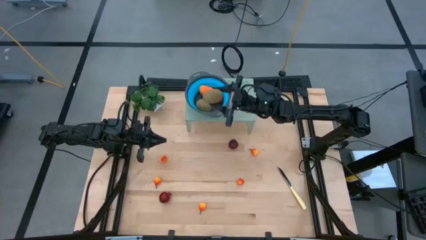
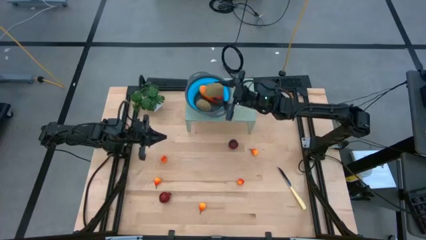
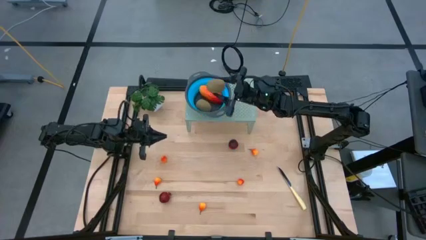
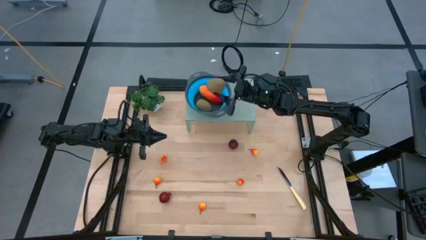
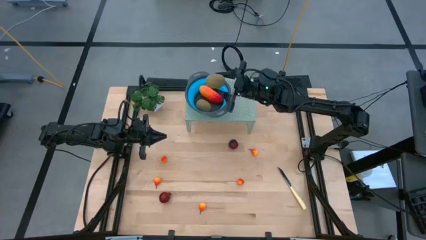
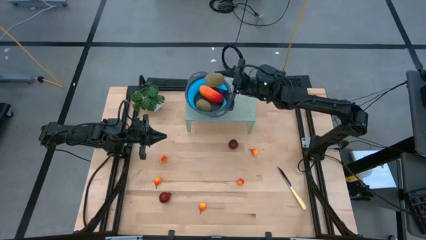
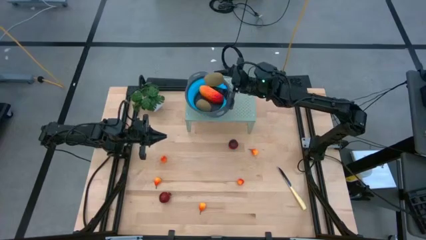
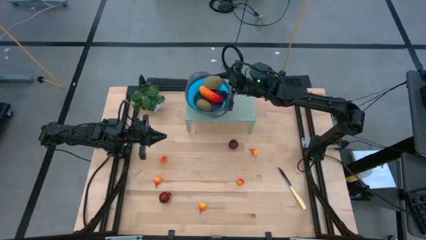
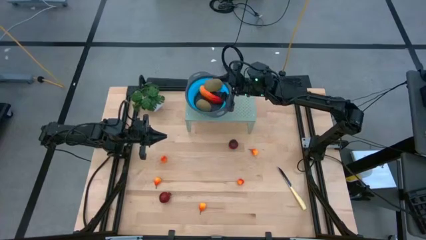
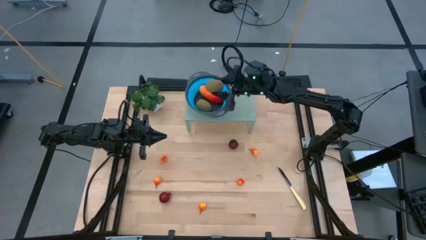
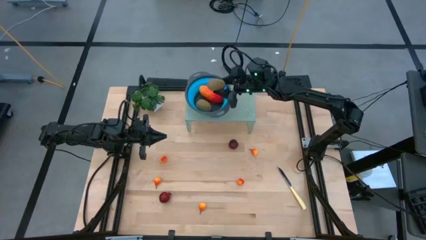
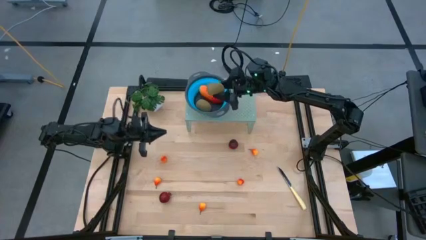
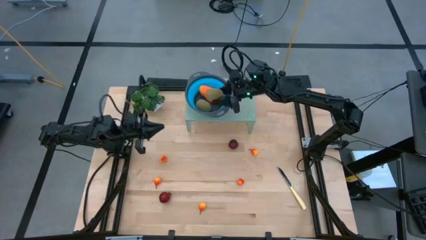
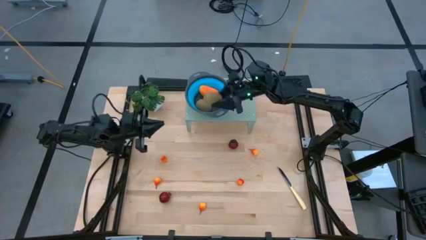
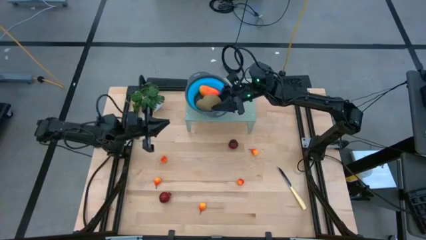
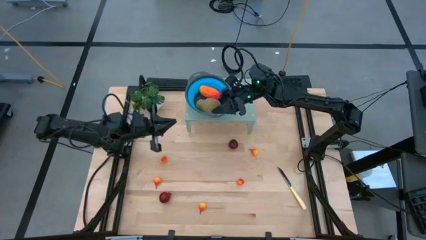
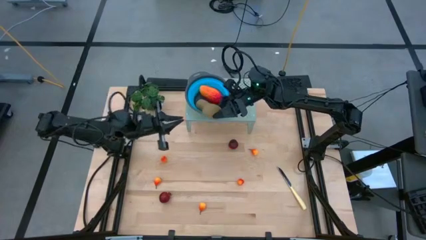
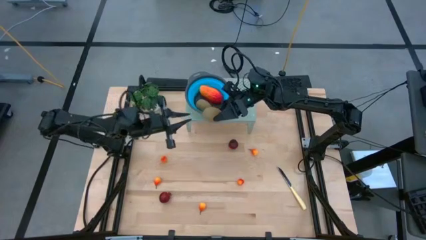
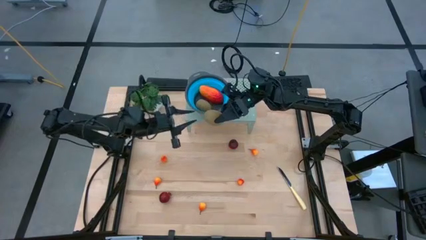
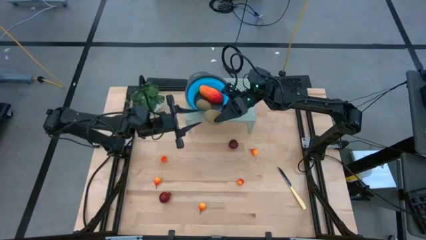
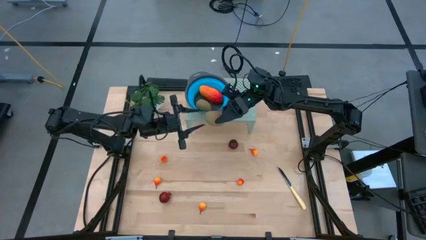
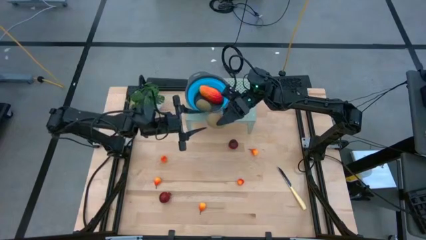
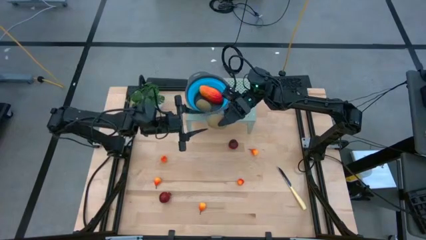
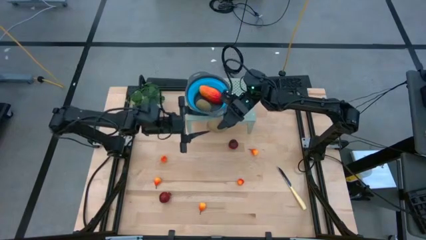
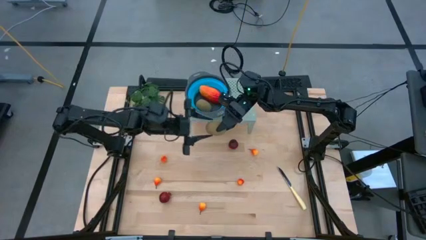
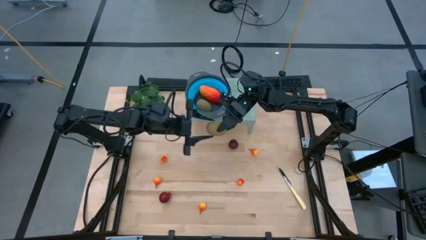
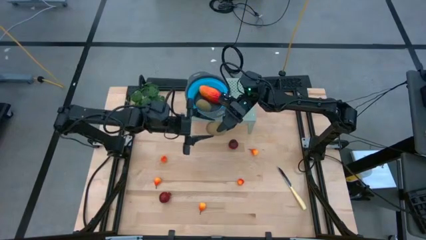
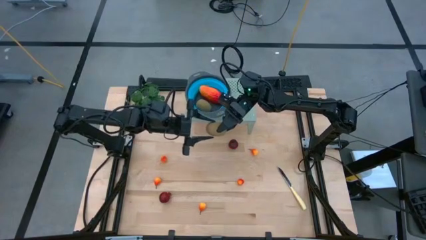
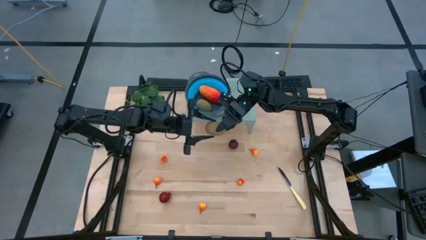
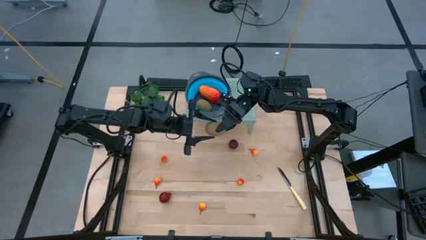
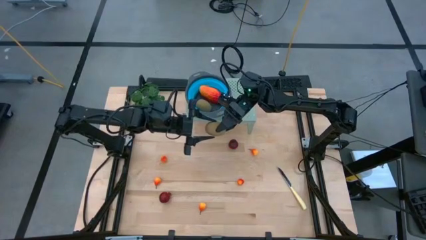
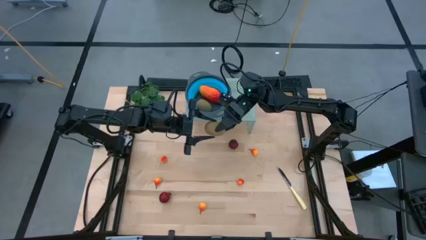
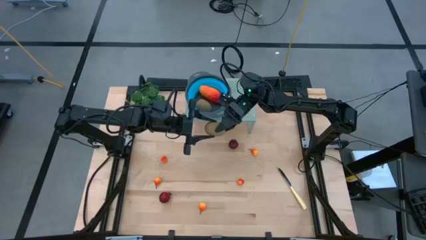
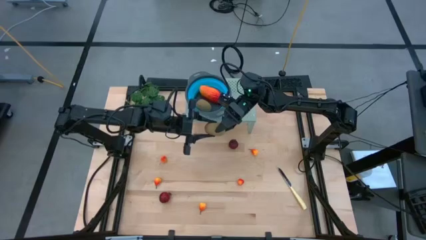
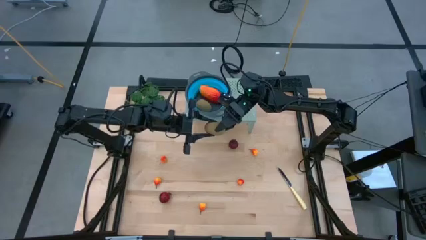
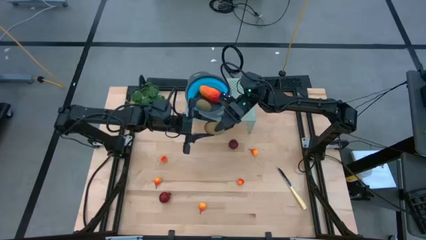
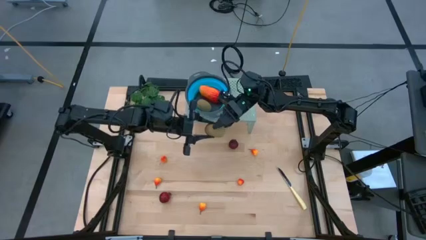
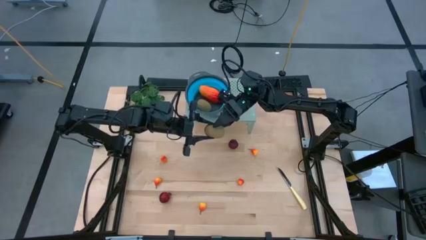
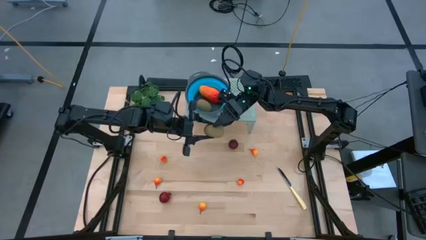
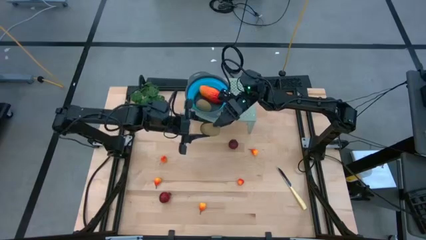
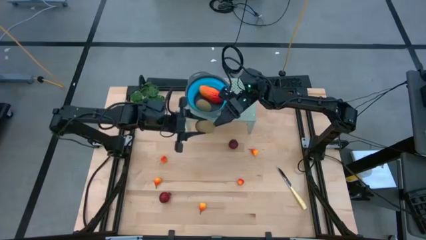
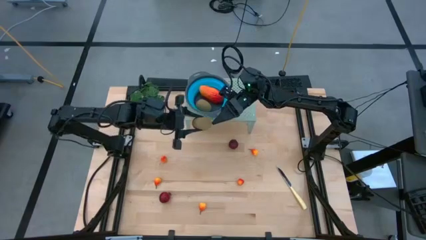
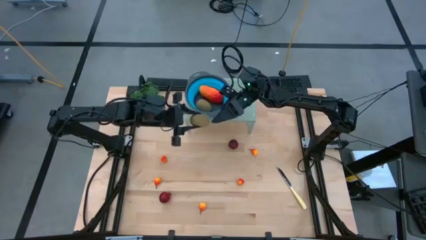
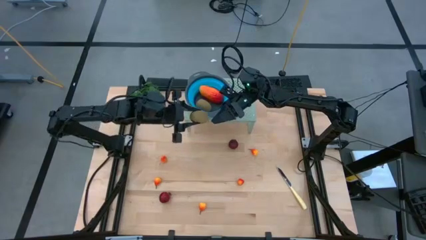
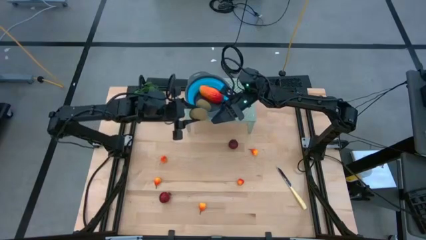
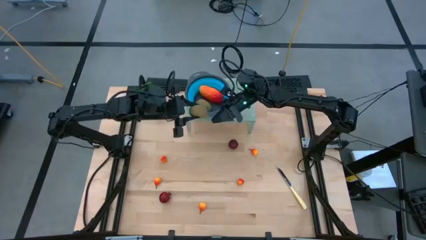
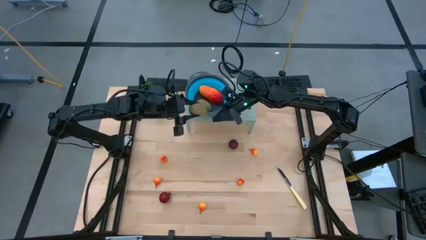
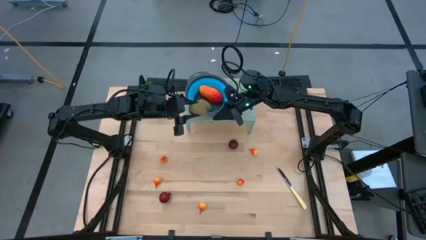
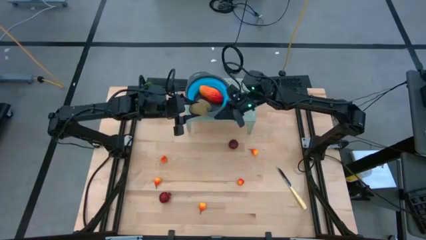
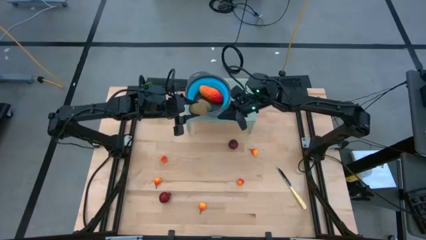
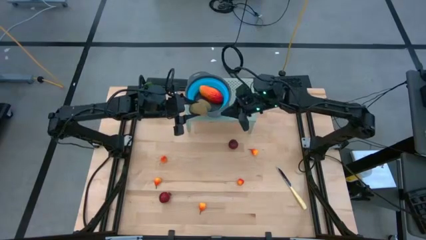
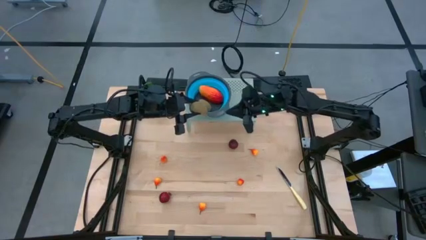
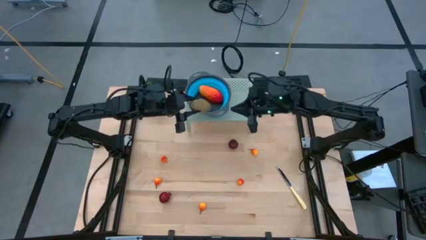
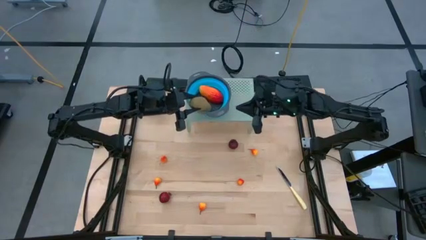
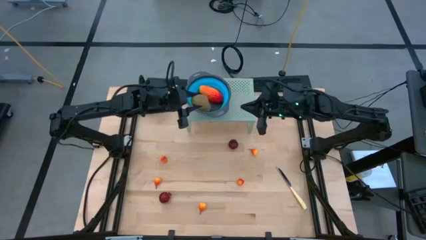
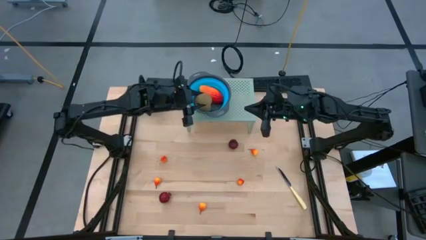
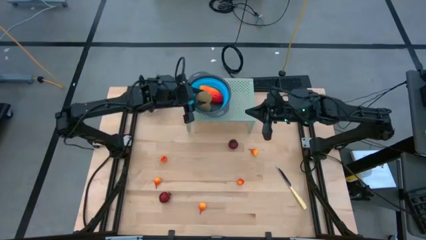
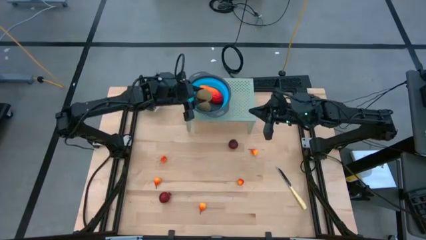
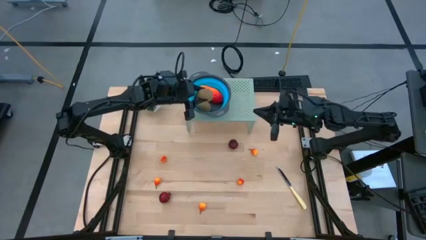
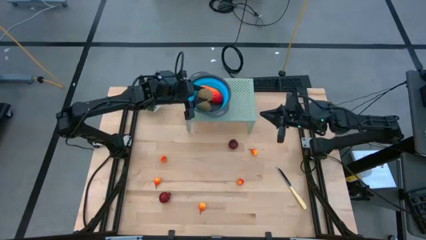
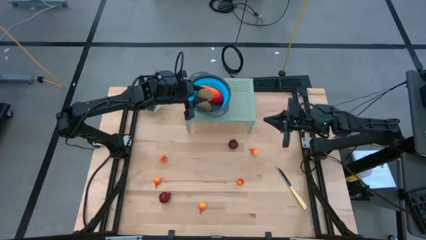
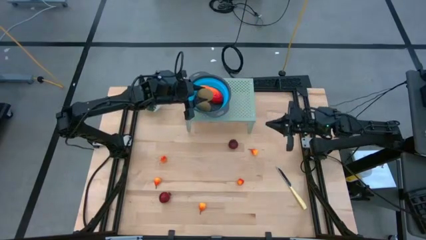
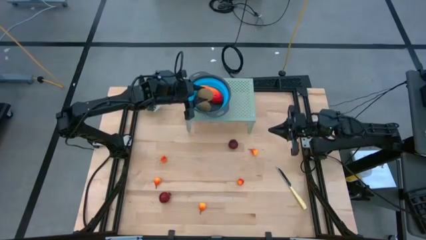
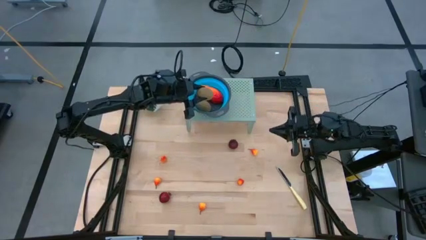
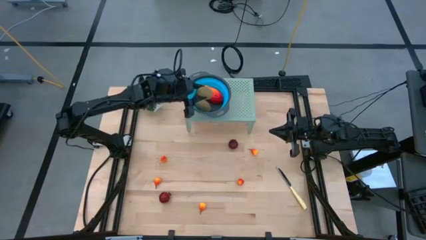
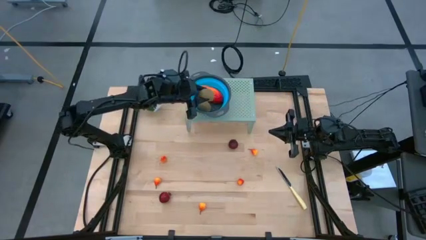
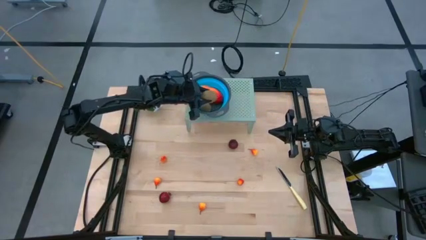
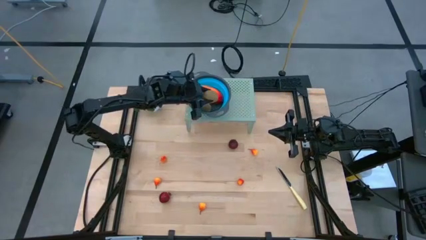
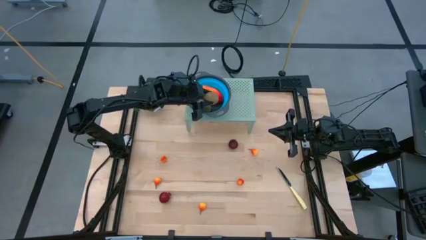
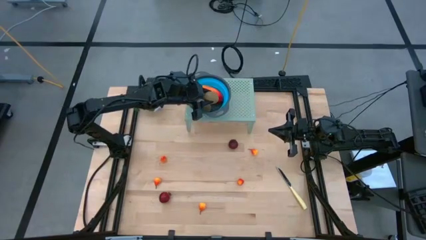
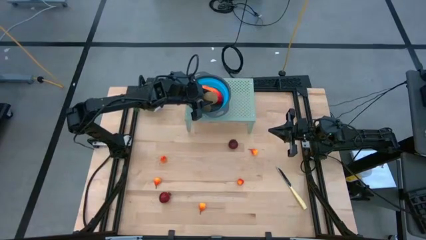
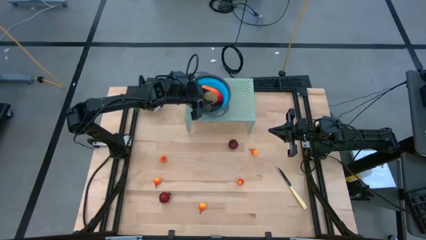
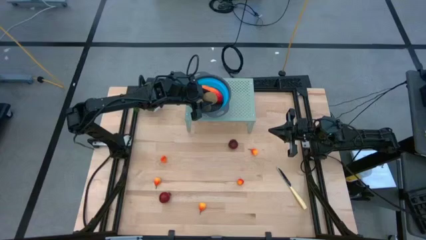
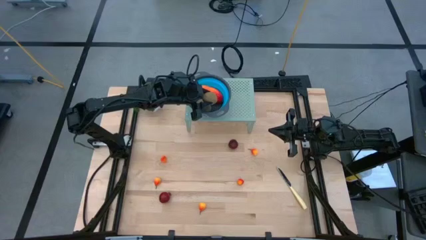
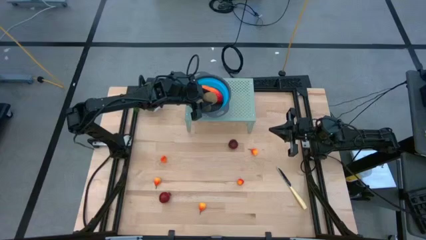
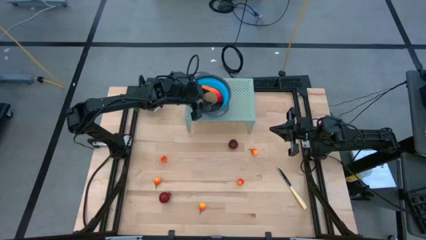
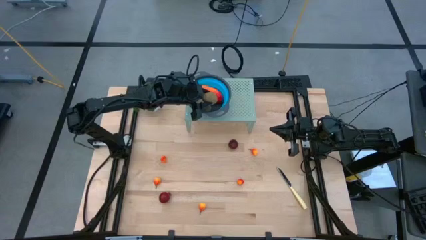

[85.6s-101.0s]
Task: Pick & Place Fruit
Put the brown kiwi into the blue bowl on the shelf
